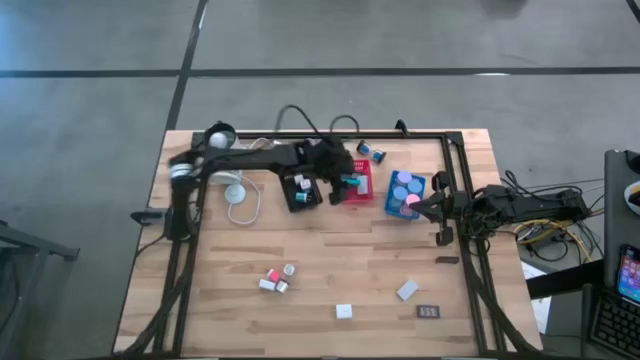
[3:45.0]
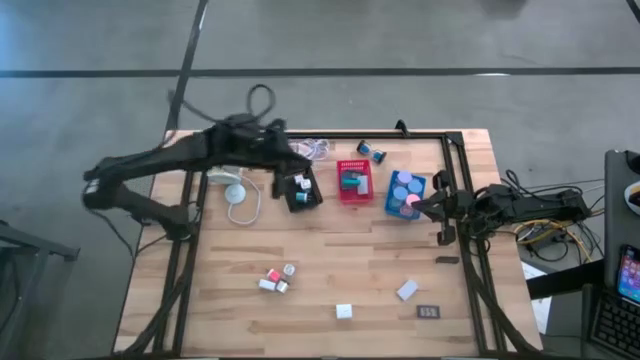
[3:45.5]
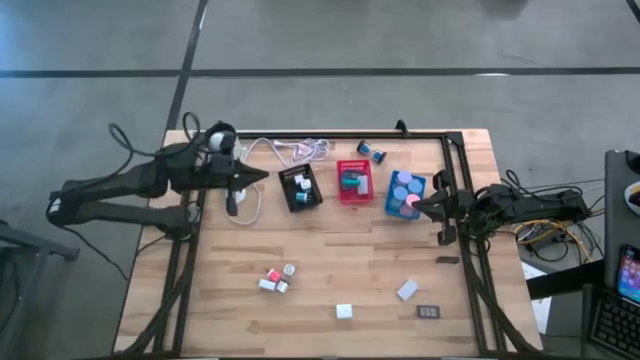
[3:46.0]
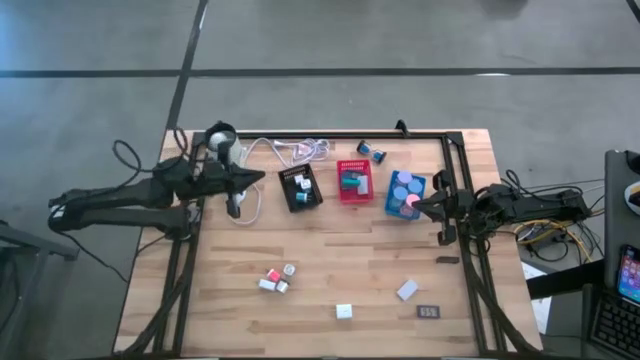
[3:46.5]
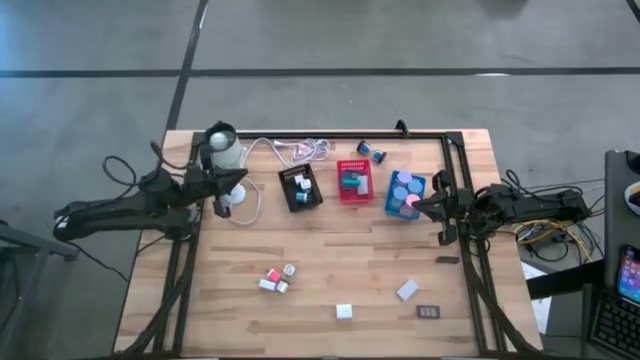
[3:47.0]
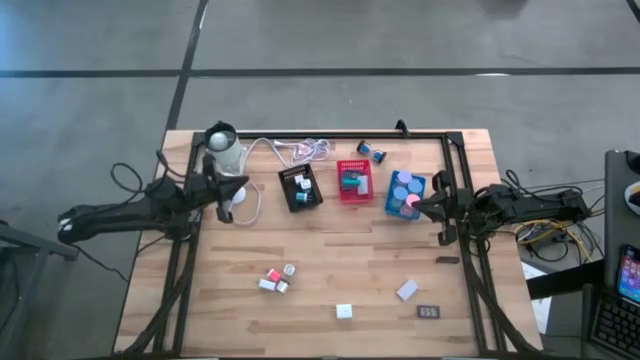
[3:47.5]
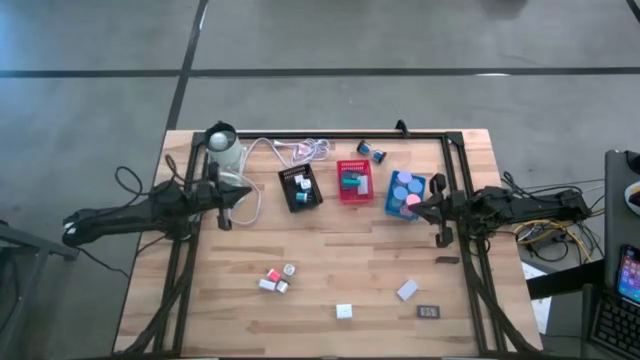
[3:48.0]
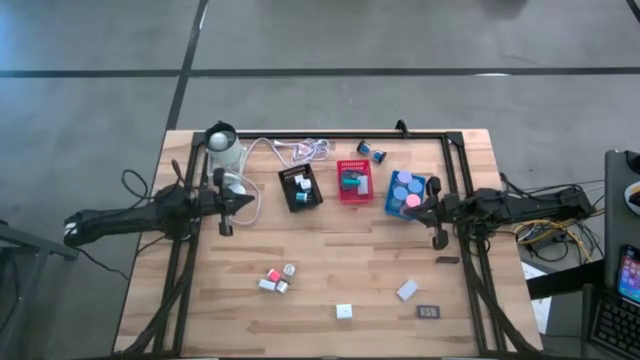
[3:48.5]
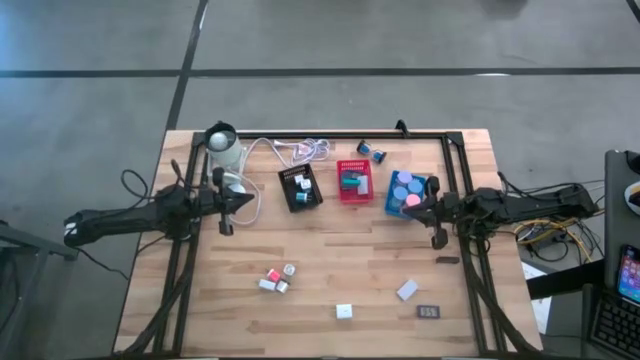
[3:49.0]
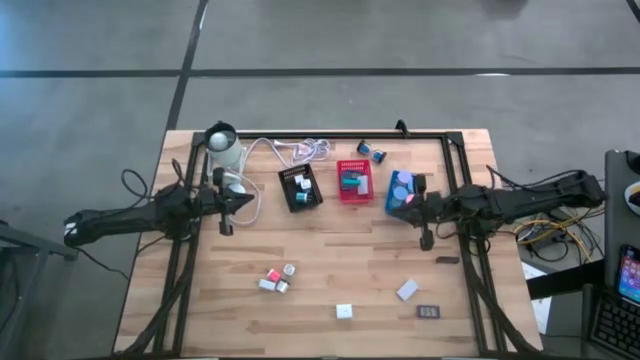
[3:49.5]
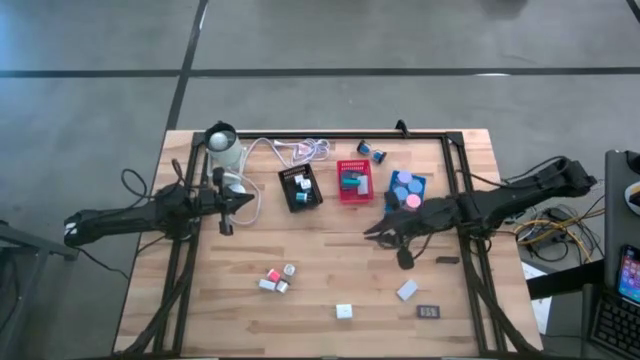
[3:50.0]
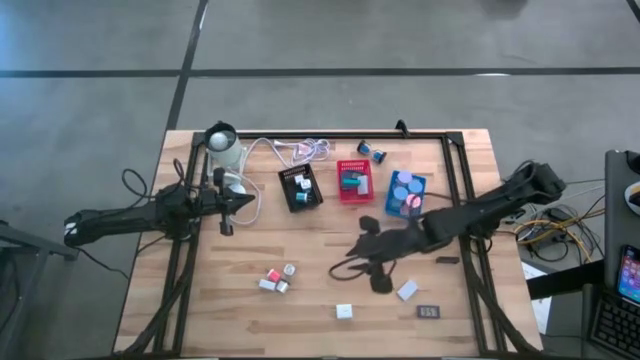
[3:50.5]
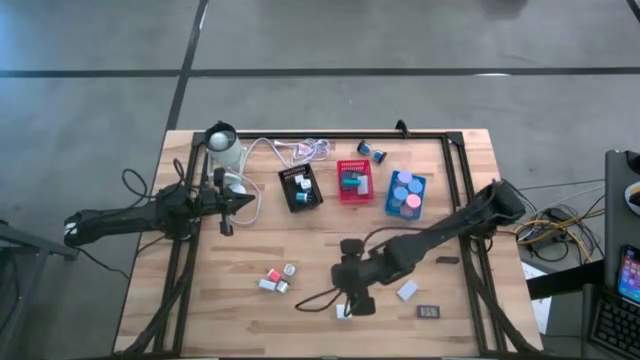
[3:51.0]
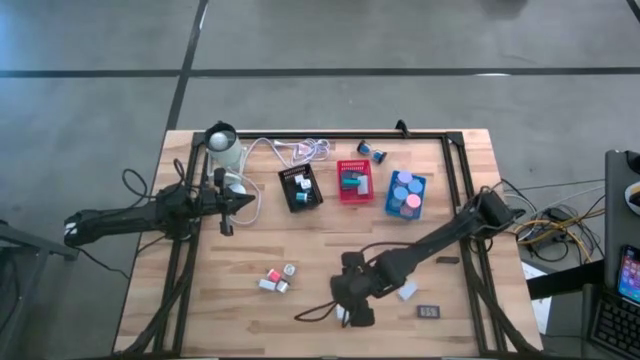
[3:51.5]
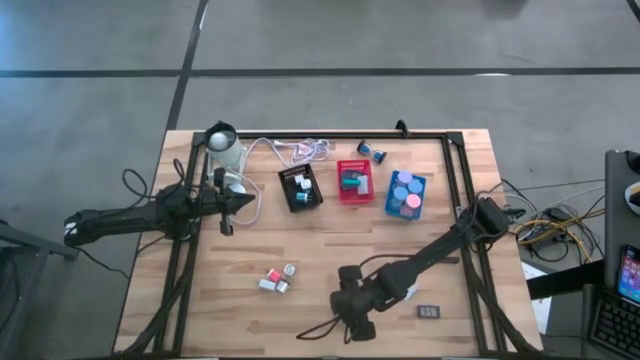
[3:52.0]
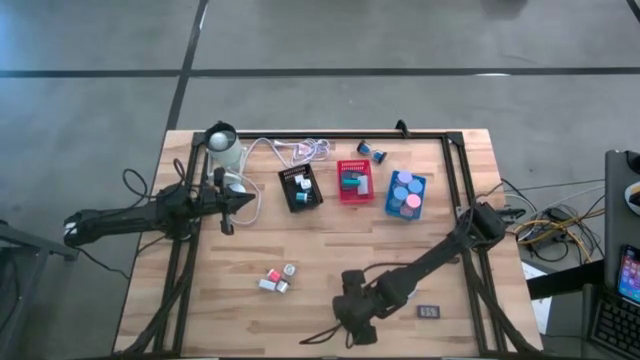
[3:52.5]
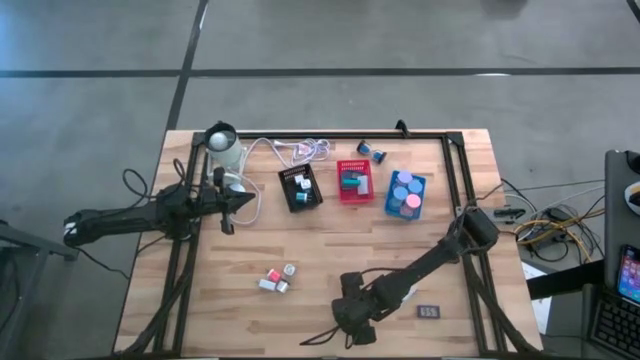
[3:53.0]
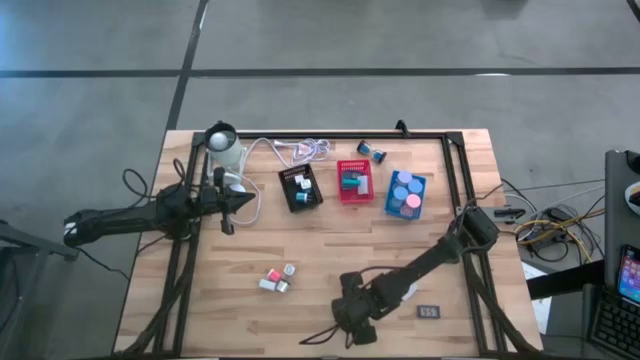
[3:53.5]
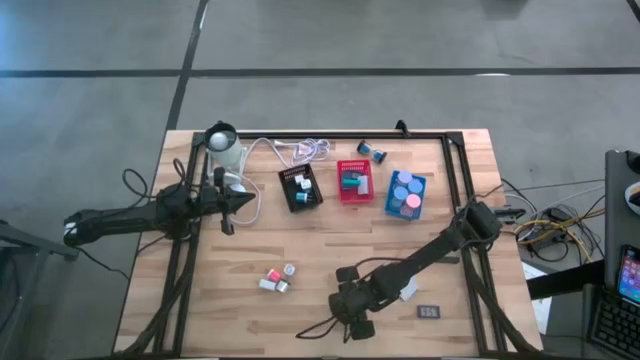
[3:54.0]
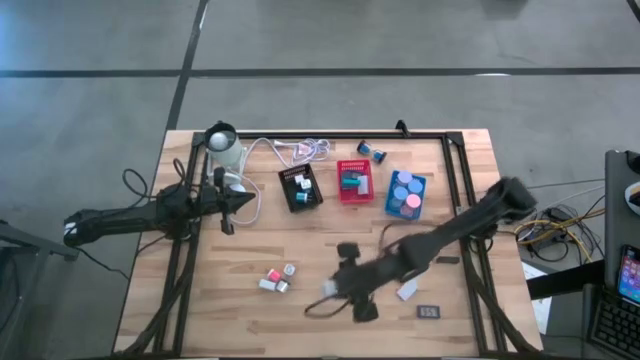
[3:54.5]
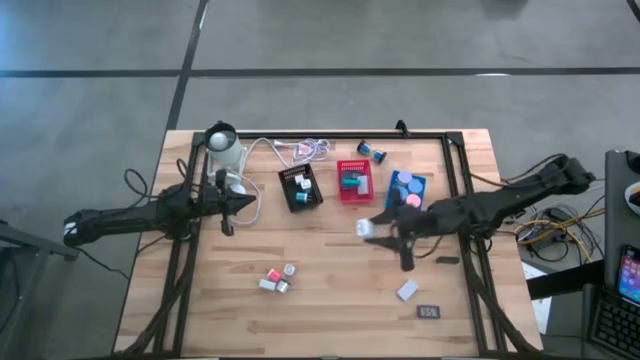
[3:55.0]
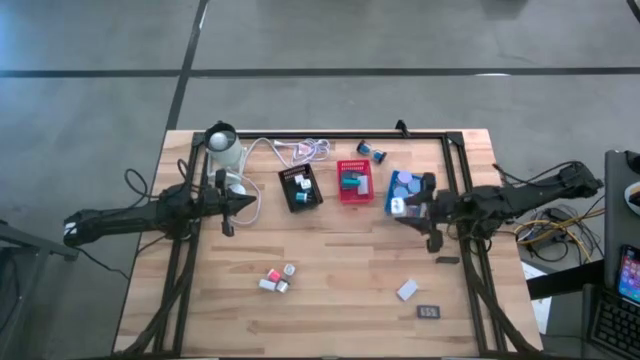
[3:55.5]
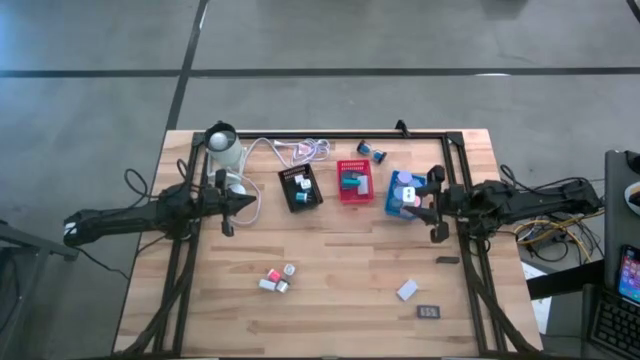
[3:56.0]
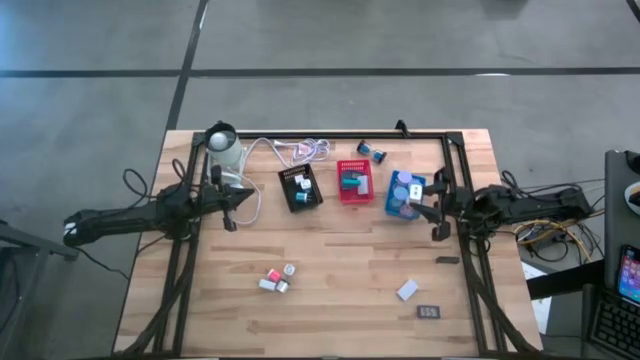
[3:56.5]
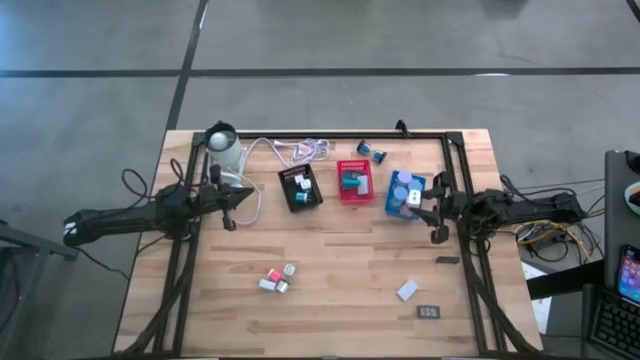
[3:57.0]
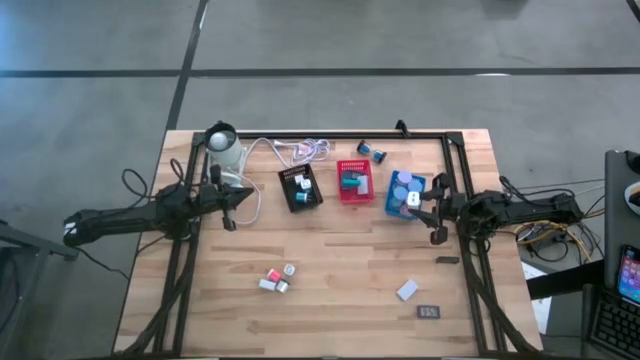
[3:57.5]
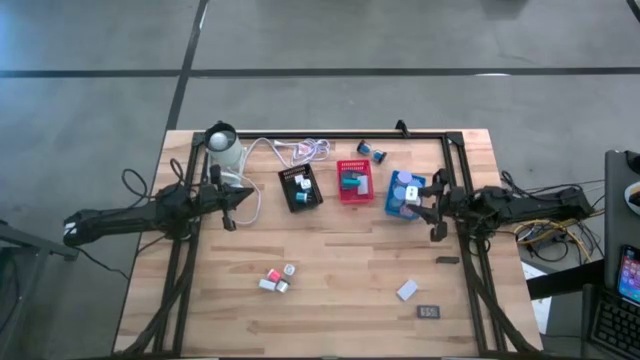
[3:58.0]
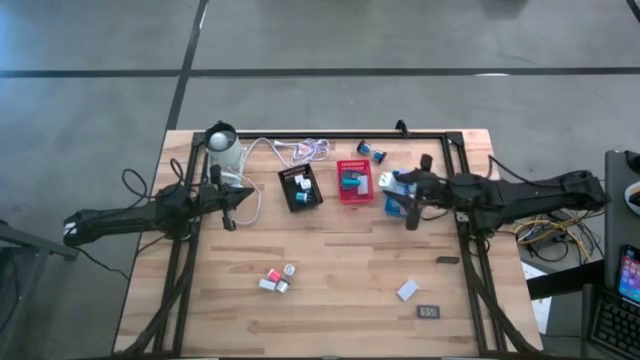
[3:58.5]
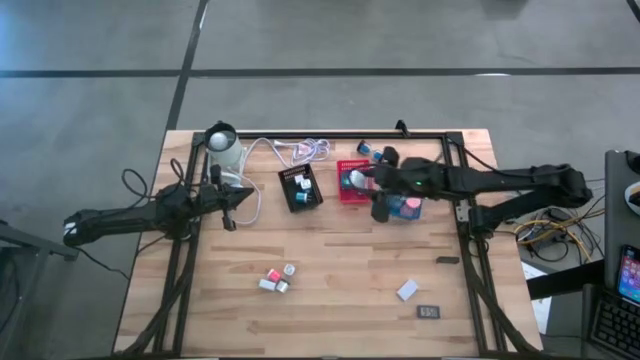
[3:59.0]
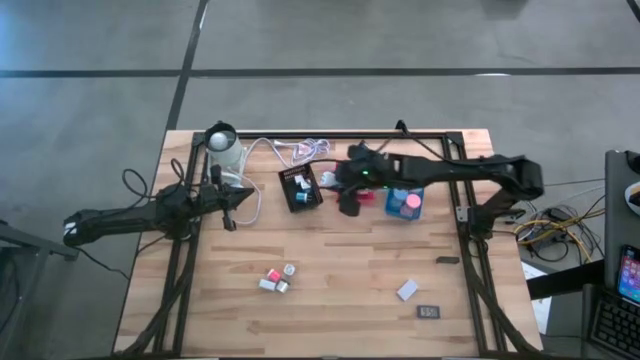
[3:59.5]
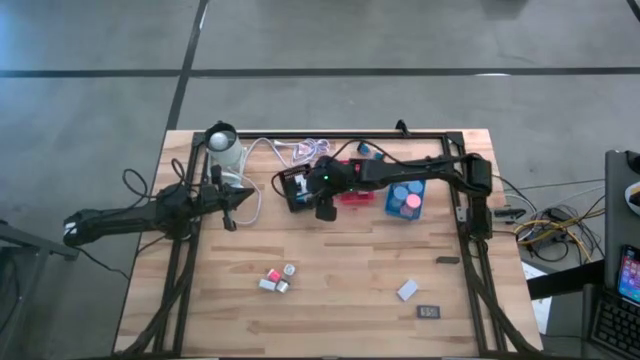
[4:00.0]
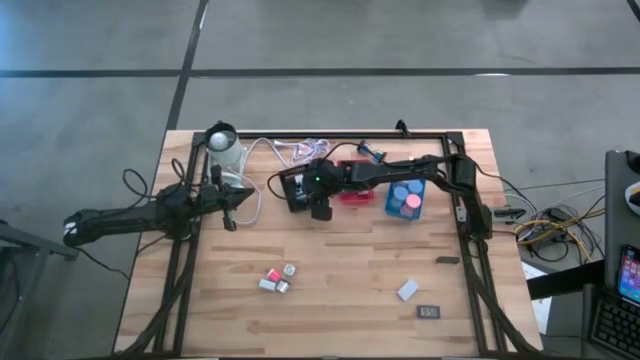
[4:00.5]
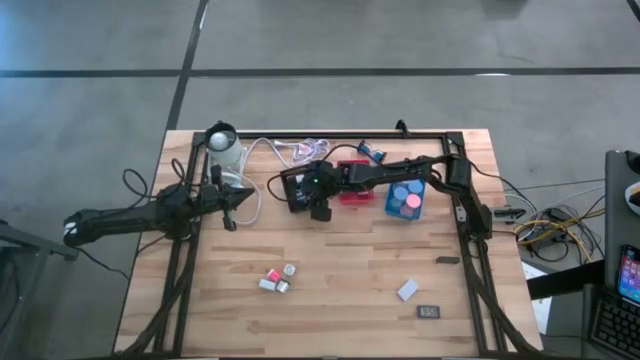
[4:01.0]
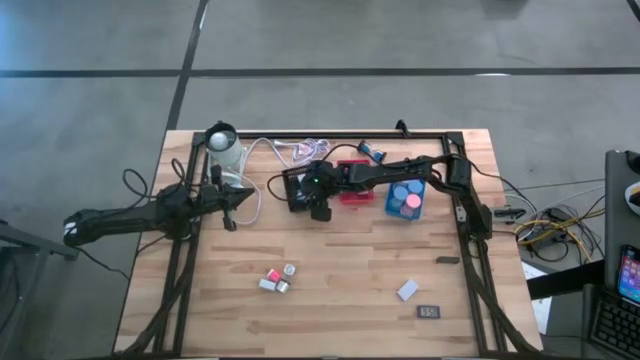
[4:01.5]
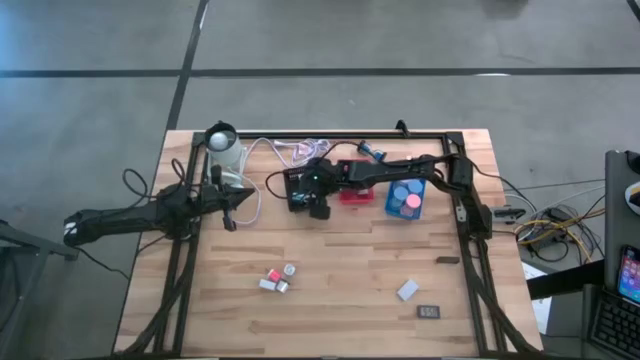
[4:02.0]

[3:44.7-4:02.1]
Task: Pick & Place Office items
Put the bottom white charger adapter into the black bin

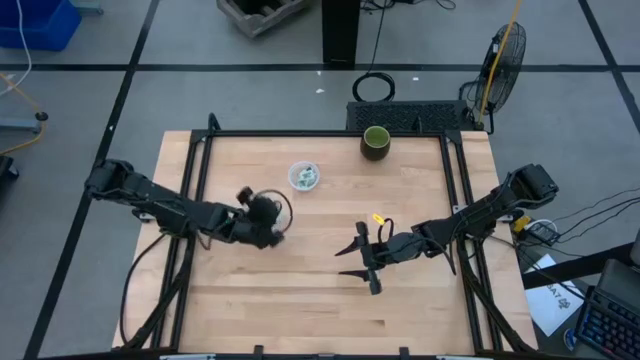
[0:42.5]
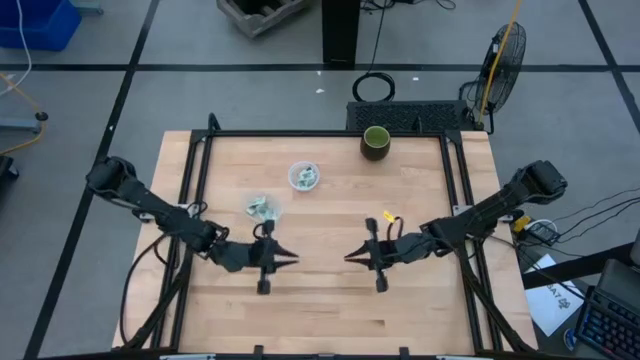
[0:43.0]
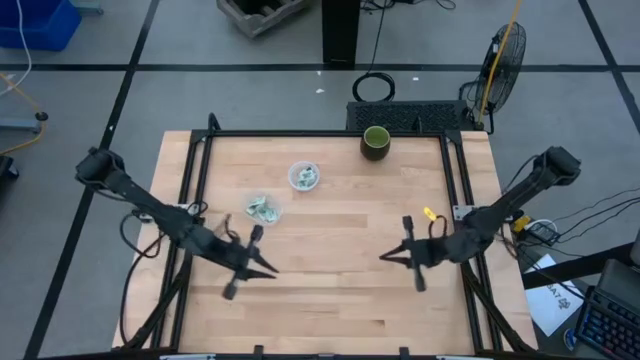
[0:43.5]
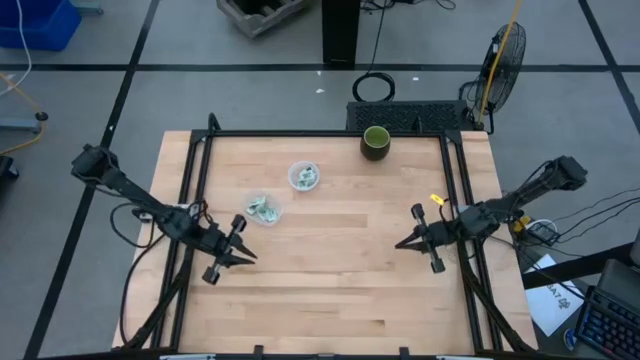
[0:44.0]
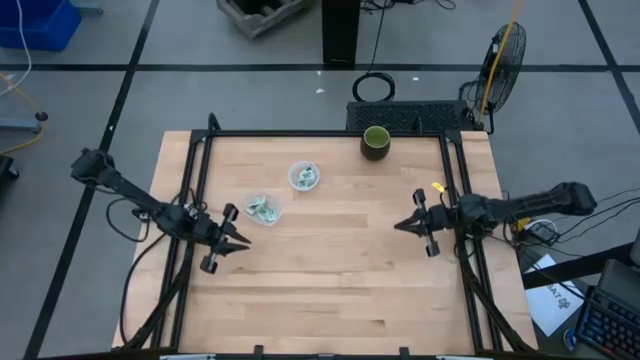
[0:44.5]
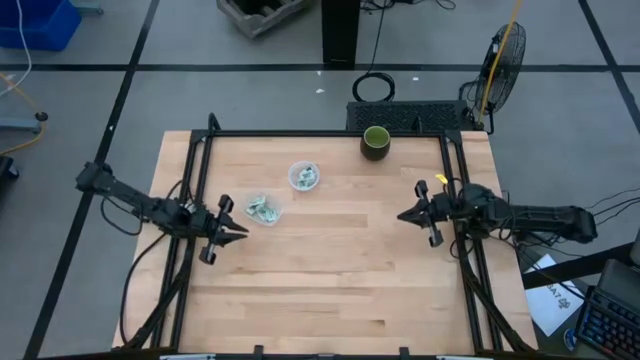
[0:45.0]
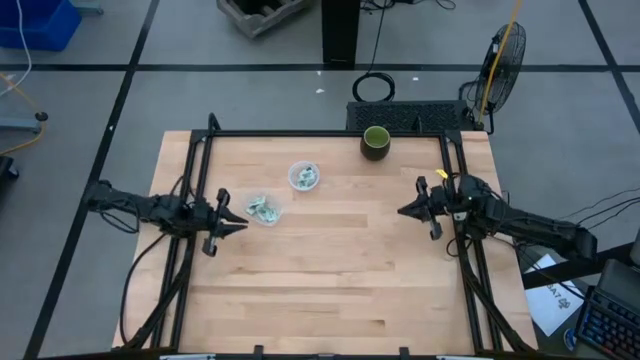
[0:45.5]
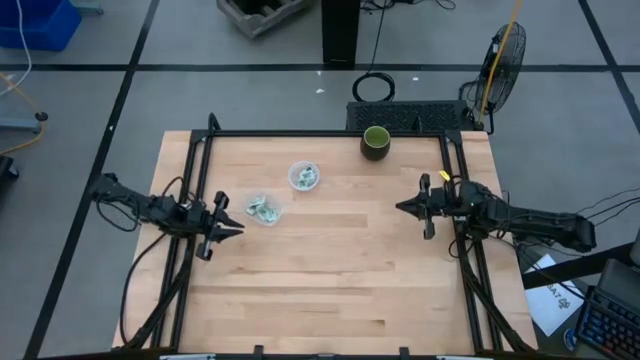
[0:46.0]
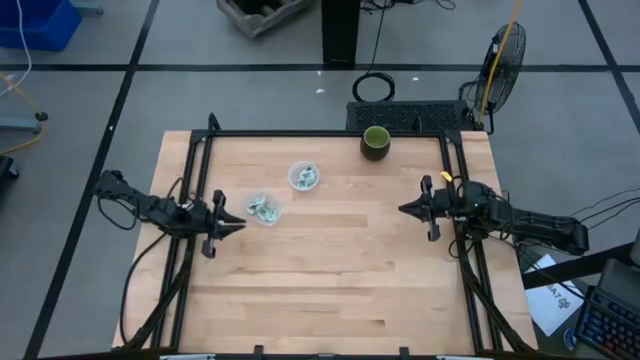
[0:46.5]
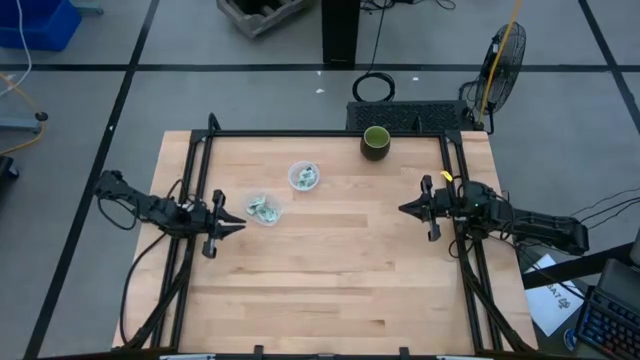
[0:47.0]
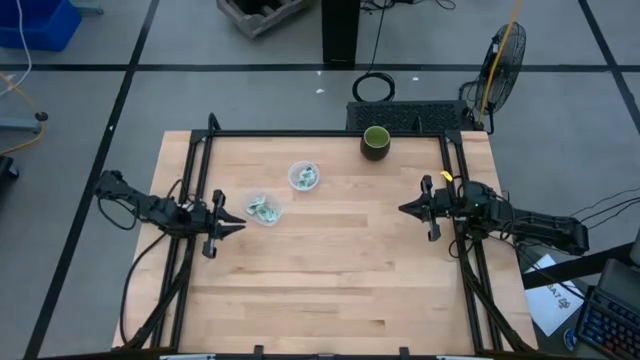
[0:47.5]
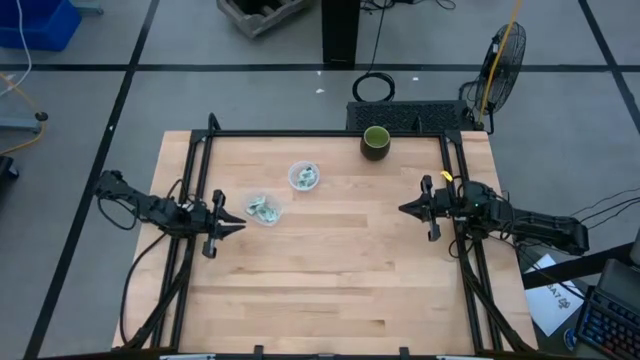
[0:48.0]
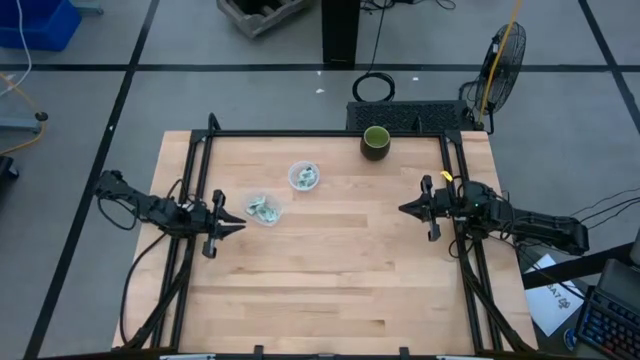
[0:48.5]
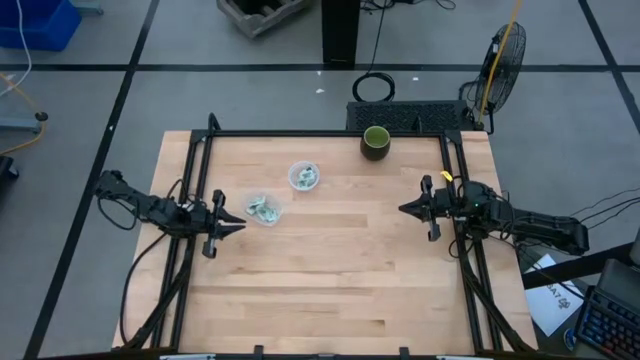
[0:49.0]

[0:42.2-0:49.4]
Task: Pick and place Stevia / Truvia into bins
Return to Home Position
